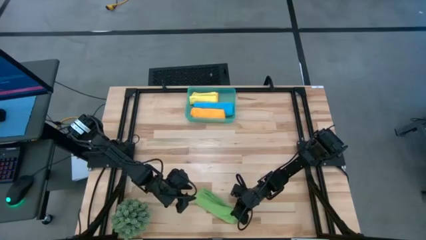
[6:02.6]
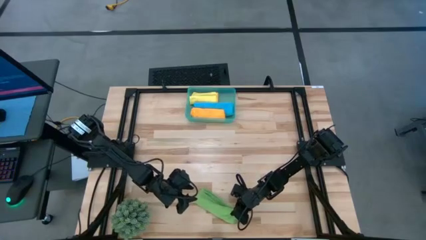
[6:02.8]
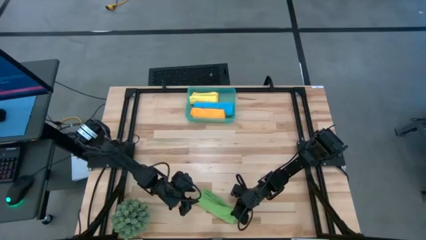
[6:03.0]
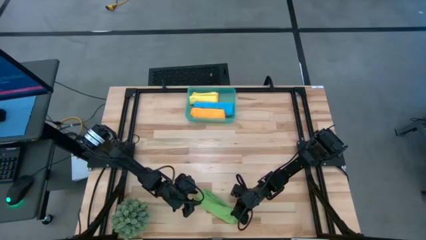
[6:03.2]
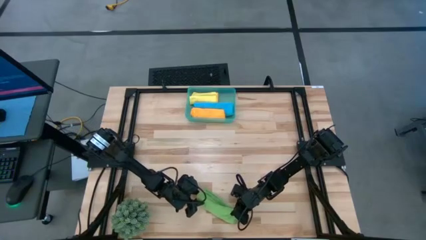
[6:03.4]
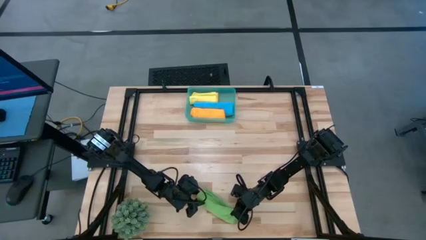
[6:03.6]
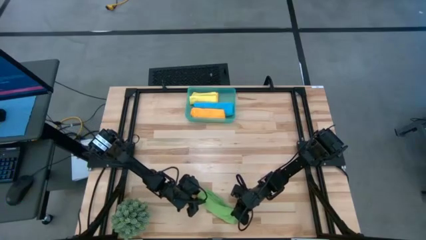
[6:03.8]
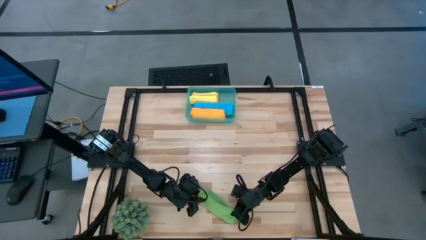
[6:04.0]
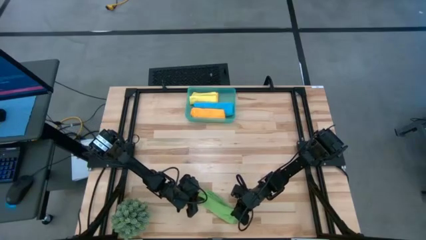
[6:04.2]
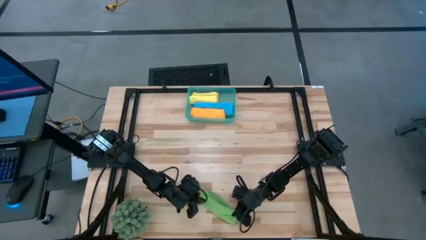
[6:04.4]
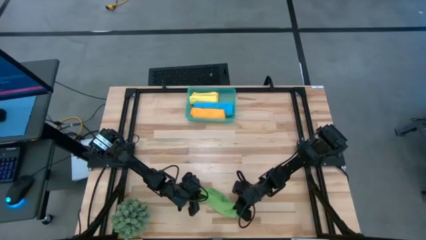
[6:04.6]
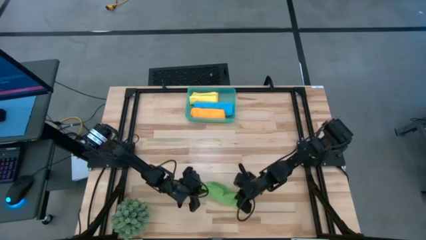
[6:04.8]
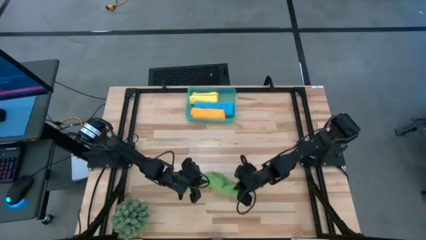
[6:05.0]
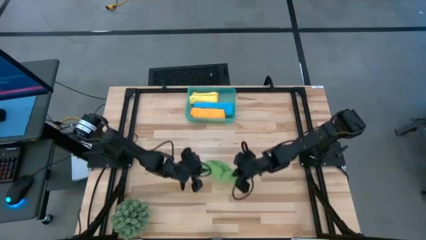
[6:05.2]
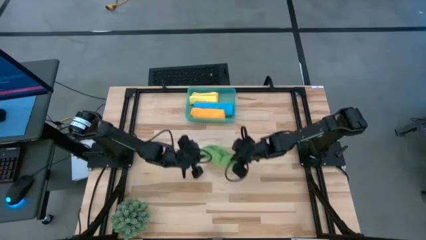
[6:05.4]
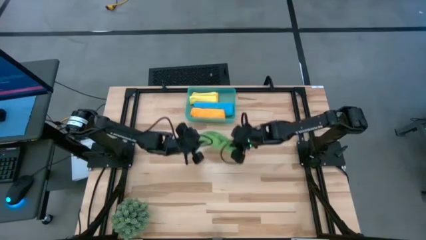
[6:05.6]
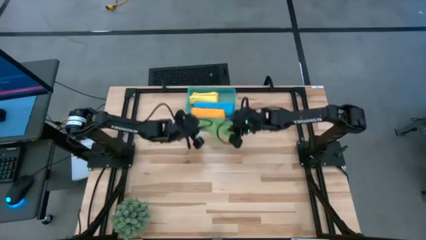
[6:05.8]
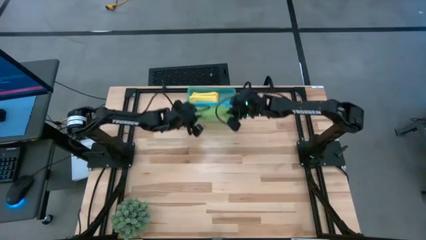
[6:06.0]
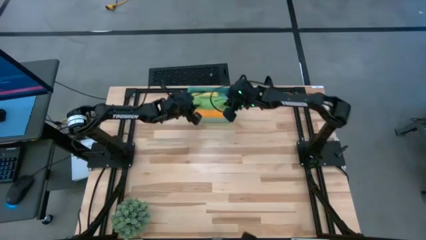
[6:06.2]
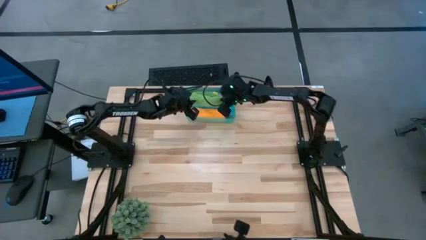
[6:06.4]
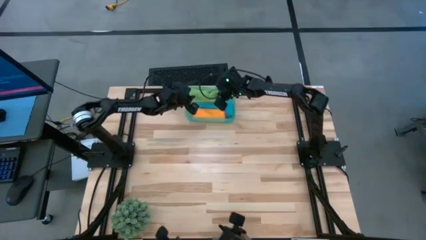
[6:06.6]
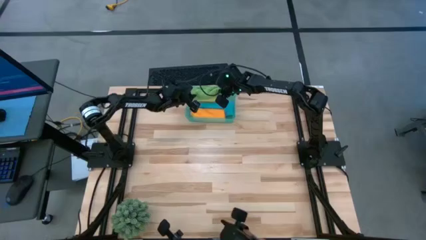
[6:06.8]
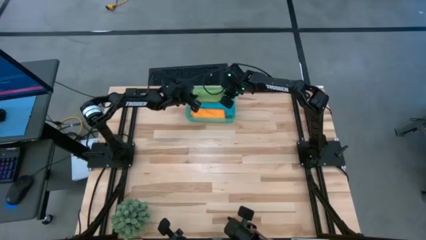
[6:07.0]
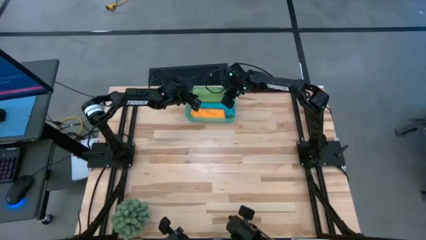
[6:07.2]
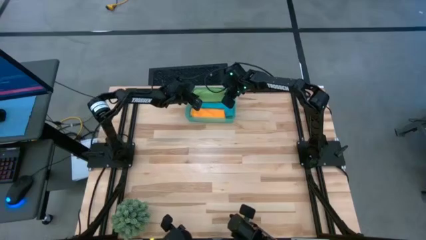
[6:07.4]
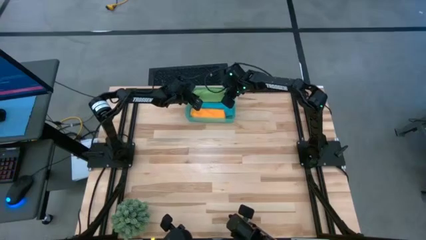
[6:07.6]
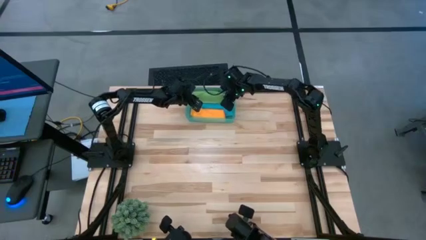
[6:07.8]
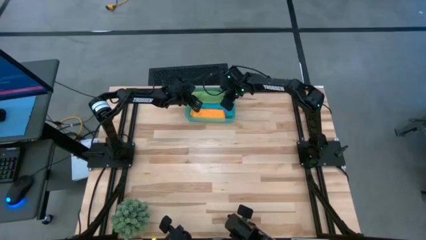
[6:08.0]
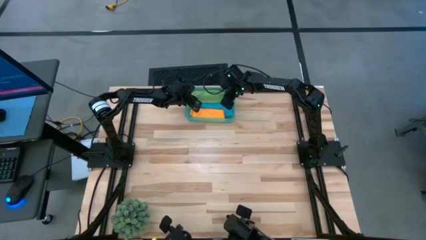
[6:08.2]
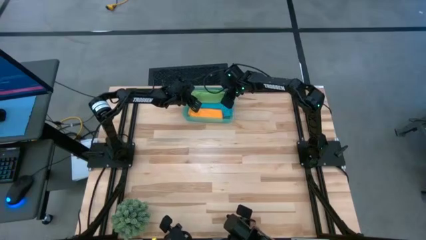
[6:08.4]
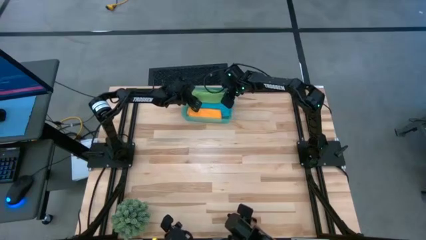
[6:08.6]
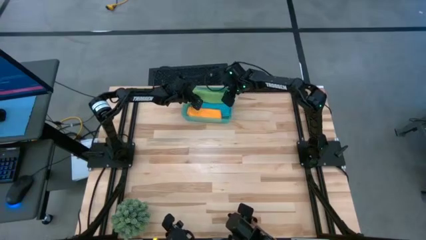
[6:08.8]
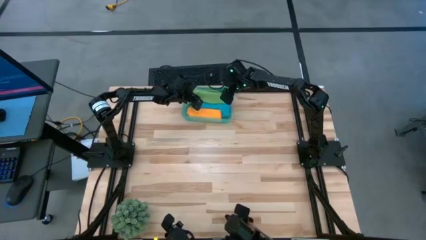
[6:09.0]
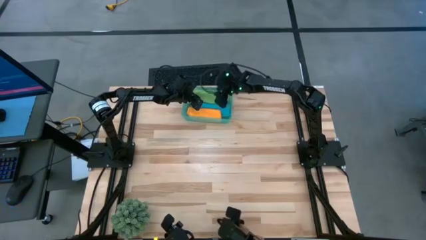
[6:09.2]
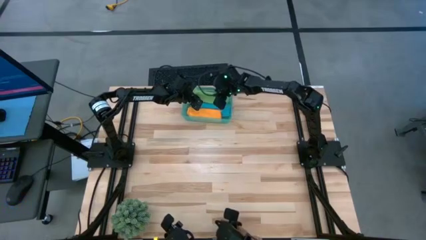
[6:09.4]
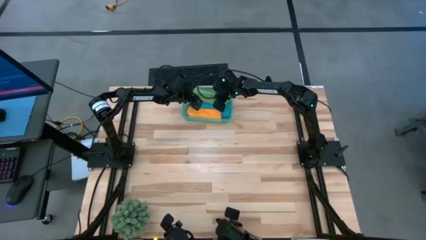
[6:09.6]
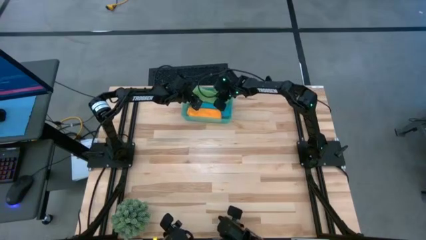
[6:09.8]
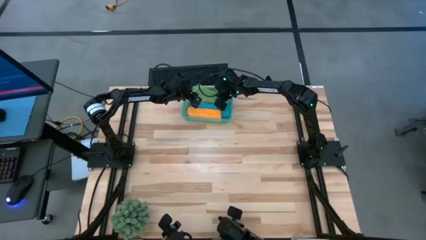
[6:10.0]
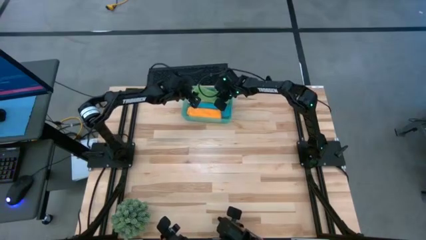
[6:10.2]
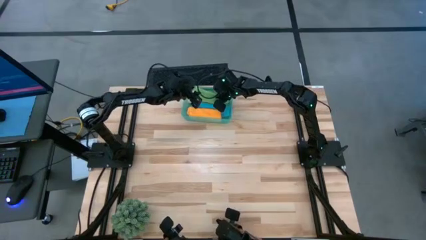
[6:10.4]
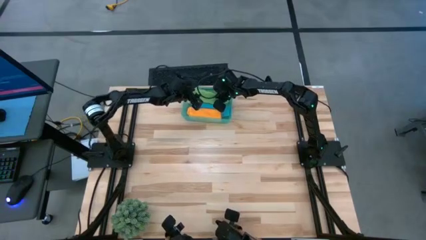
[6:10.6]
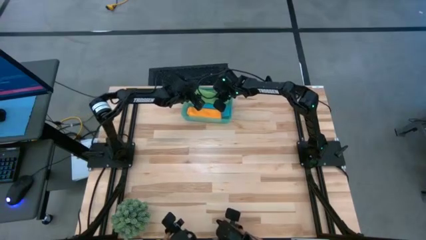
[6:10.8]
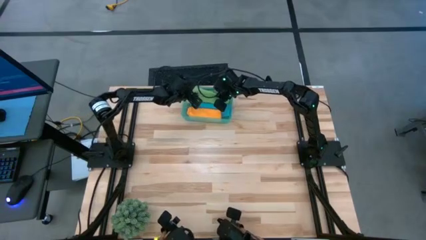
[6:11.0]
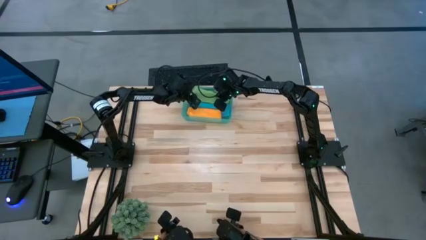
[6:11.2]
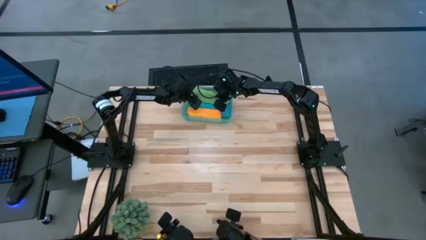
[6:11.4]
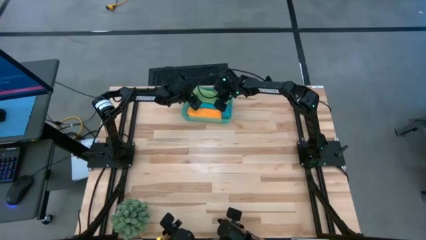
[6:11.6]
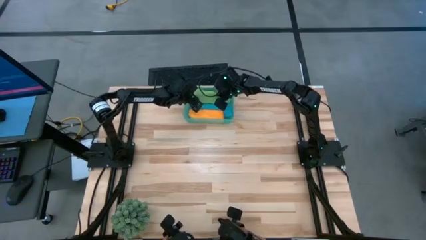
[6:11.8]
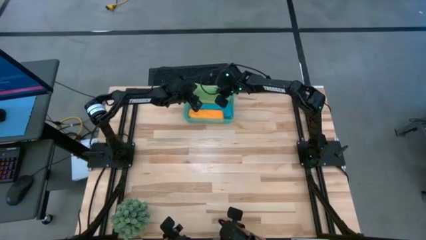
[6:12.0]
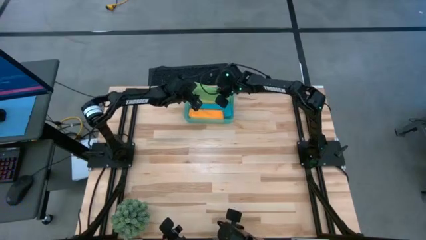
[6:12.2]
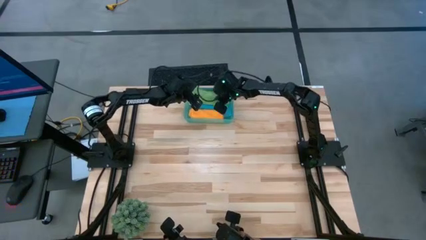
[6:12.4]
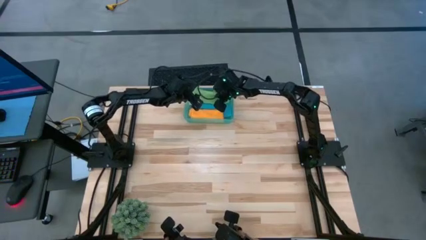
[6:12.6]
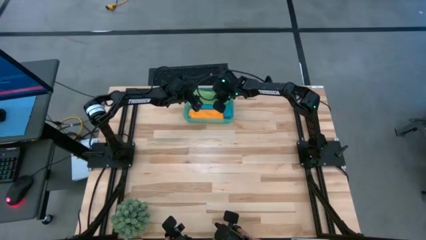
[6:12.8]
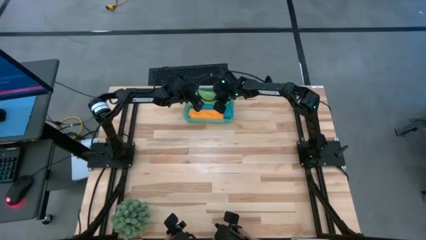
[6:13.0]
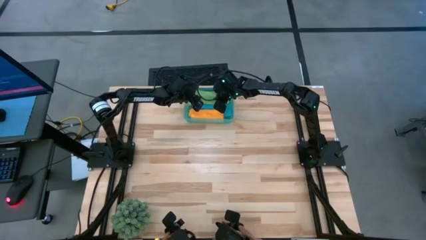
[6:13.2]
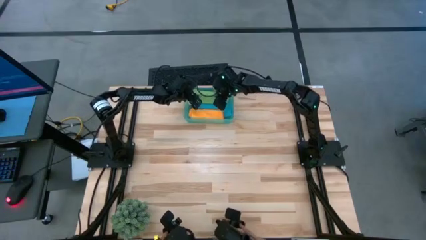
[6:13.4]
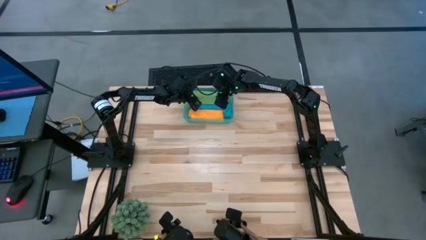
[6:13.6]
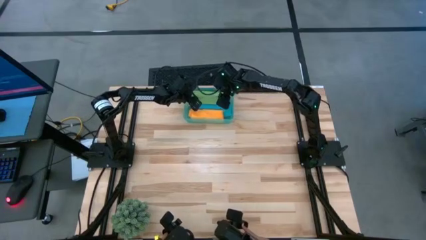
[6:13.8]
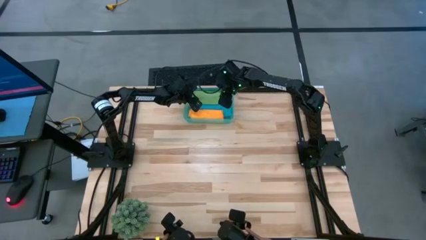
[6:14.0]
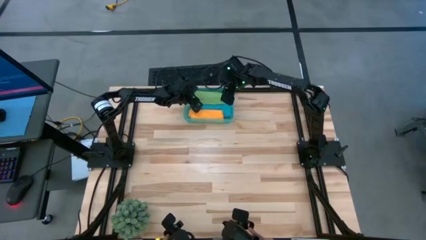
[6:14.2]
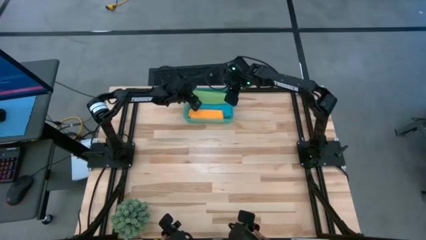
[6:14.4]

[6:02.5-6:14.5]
Task: Roll microfiber towels into tight, uniform cylinder then place into a basket
Put the rolled green microfiber towel into the green bin

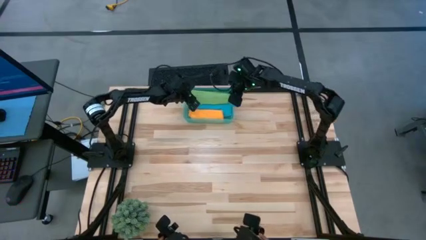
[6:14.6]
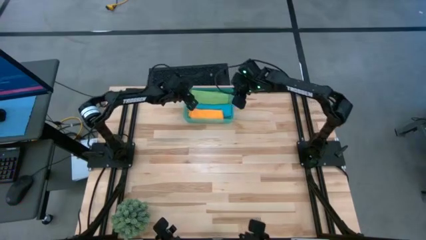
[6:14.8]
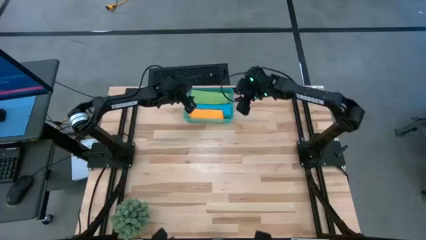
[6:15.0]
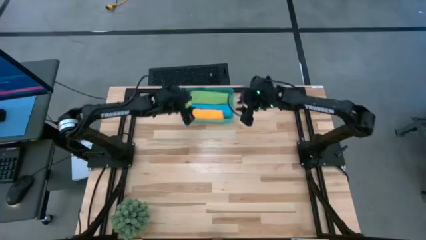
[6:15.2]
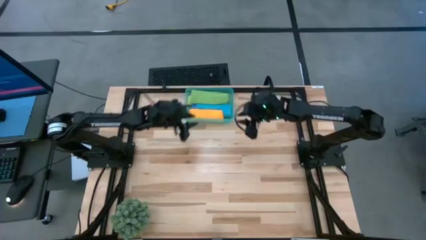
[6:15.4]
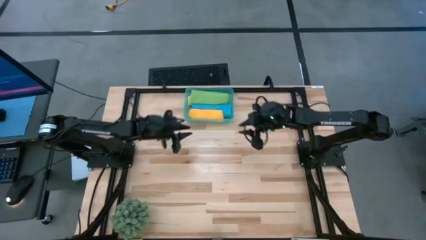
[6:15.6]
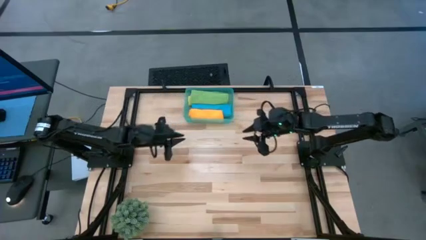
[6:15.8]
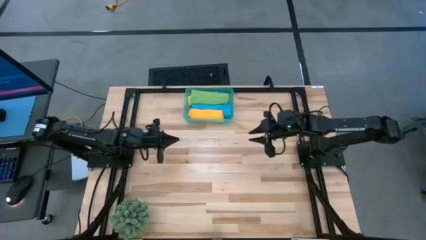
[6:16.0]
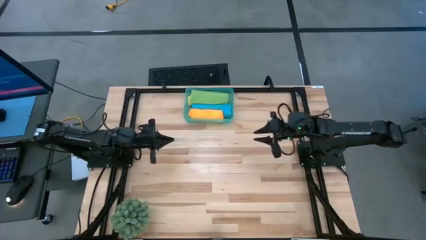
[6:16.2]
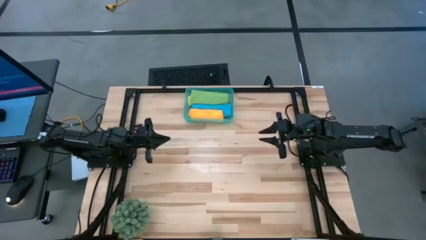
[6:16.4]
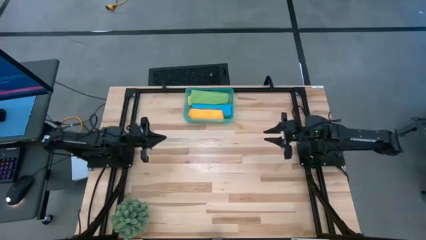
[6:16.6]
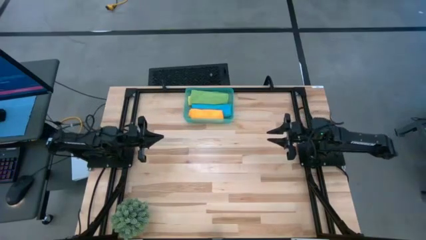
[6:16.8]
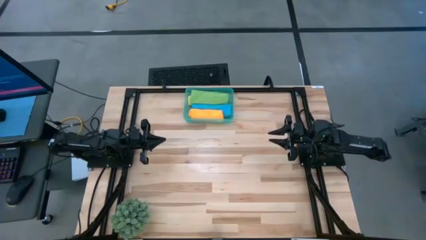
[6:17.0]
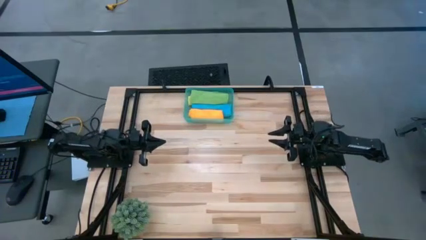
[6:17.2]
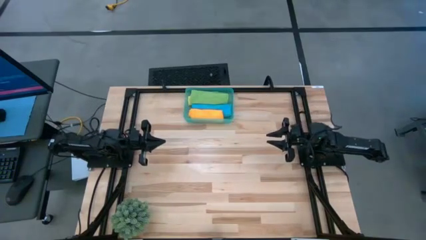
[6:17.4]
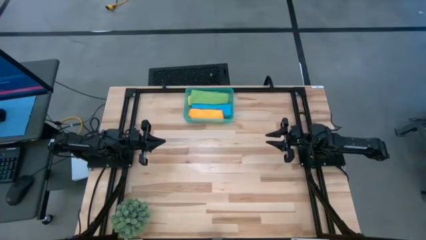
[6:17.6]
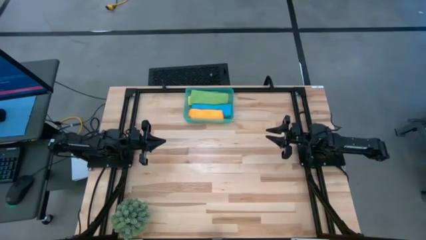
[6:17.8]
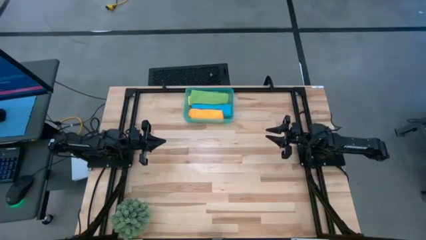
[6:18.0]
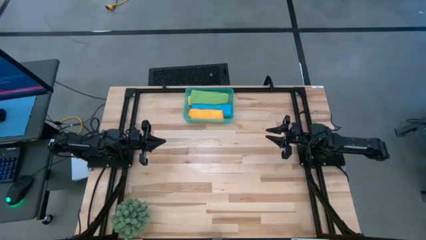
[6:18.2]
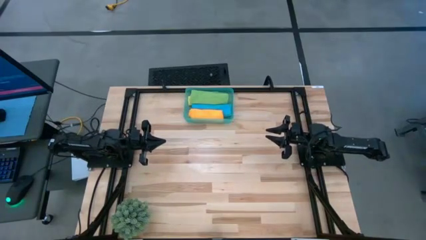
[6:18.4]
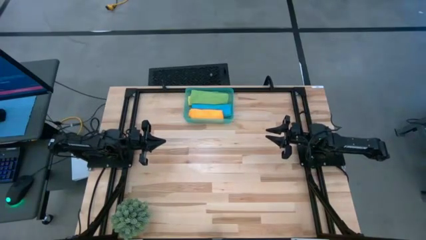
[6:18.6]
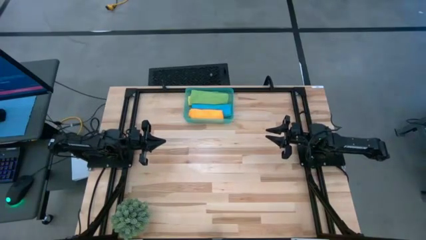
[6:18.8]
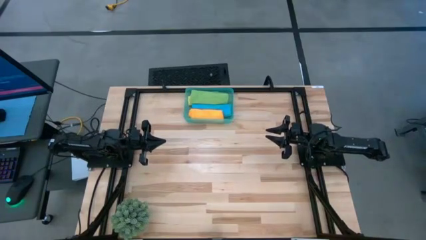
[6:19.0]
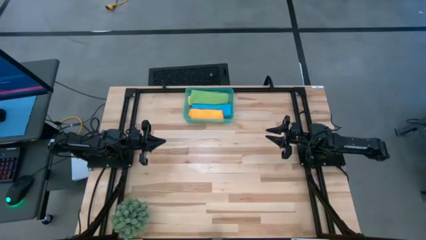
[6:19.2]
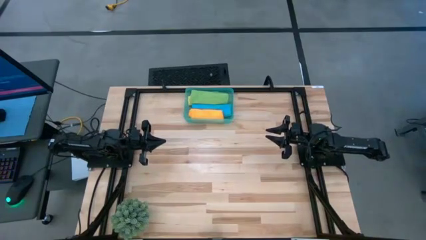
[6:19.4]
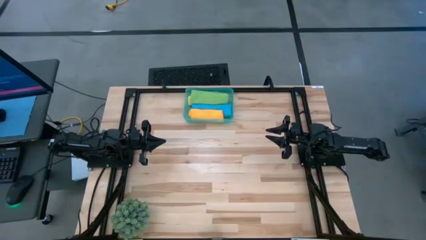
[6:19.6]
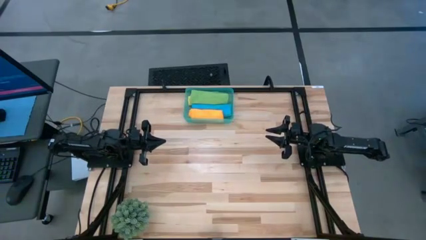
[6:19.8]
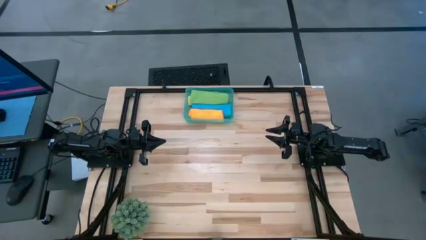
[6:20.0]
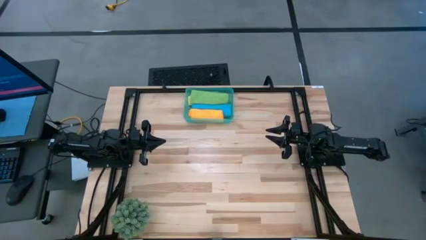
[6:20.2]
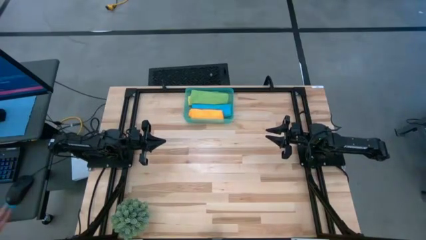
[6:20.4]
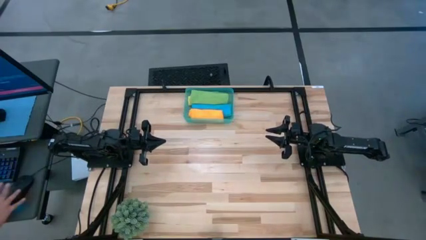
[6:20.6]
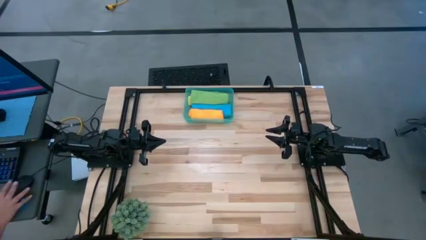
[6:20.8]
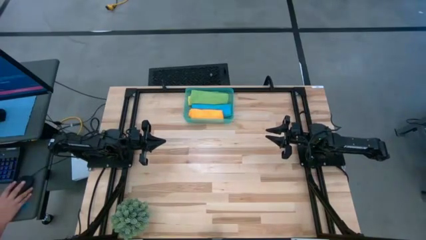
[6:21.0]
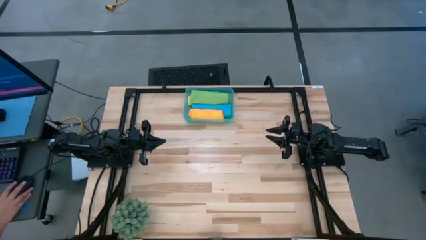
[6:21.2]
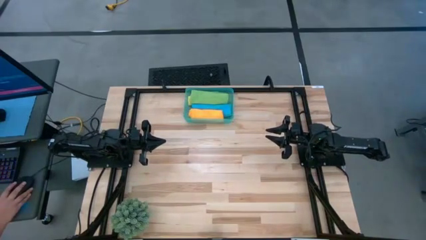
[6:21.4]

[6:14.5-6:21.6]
Return to Home Position
